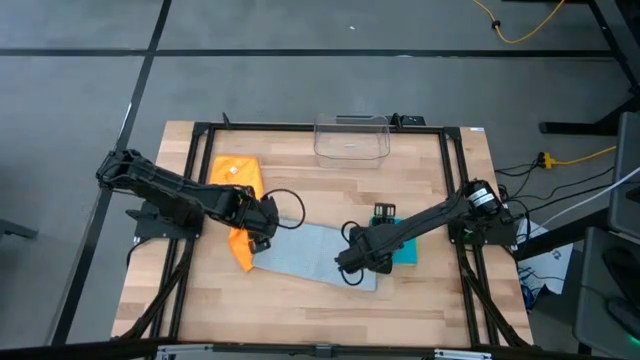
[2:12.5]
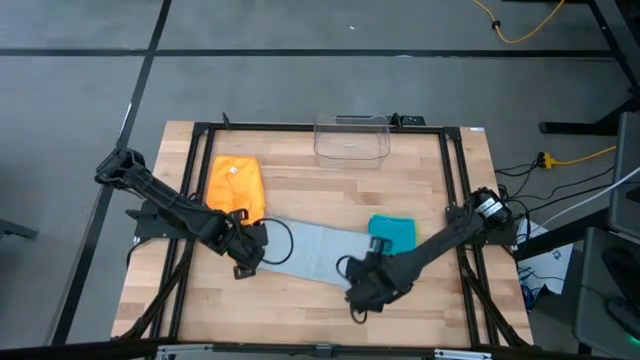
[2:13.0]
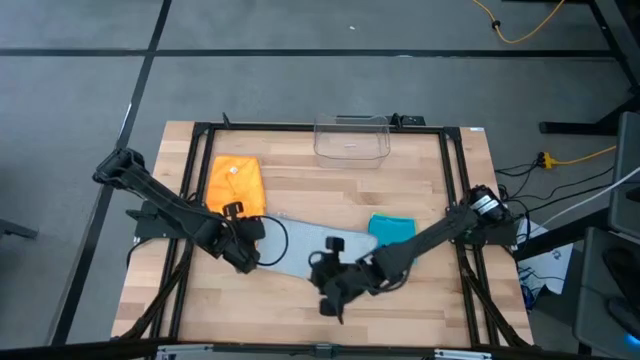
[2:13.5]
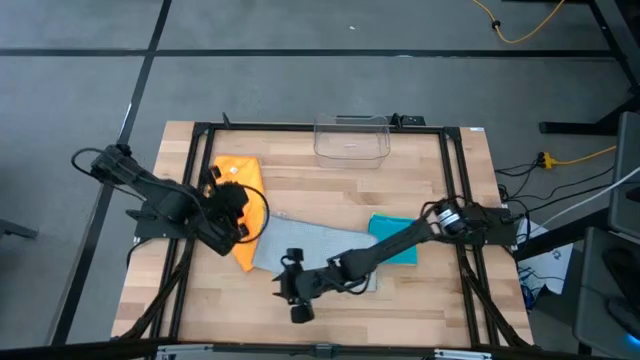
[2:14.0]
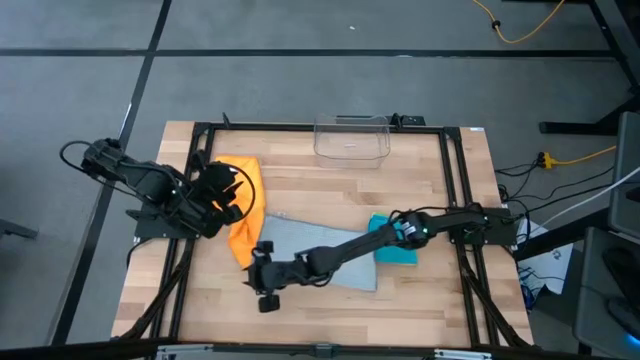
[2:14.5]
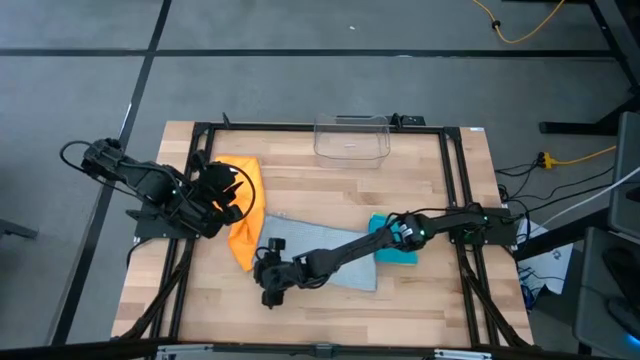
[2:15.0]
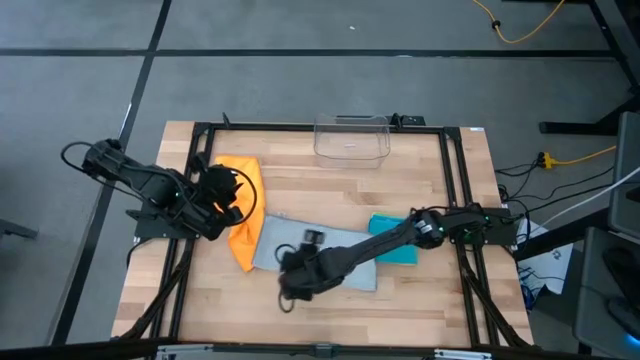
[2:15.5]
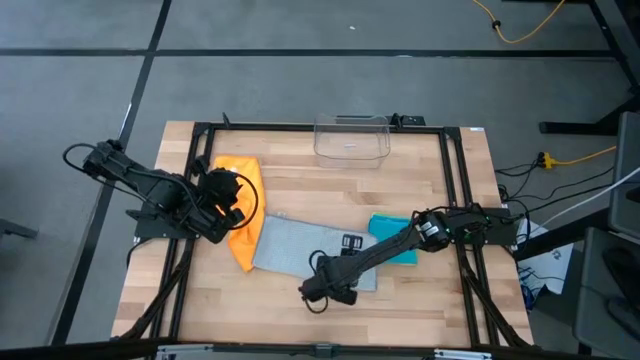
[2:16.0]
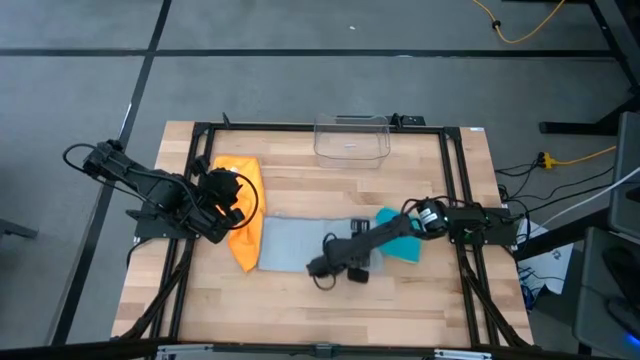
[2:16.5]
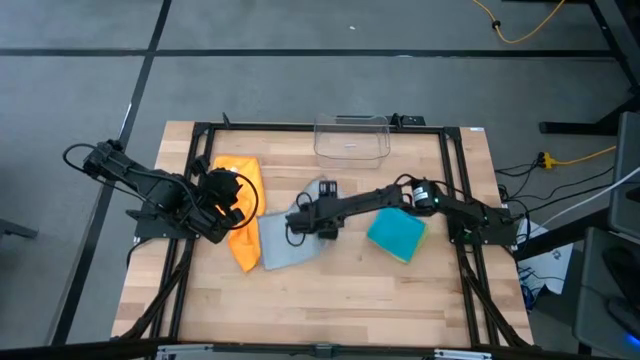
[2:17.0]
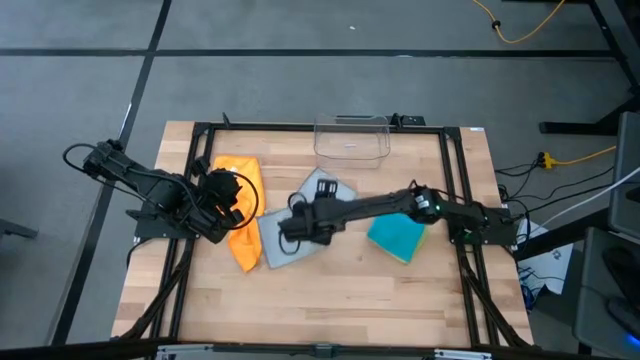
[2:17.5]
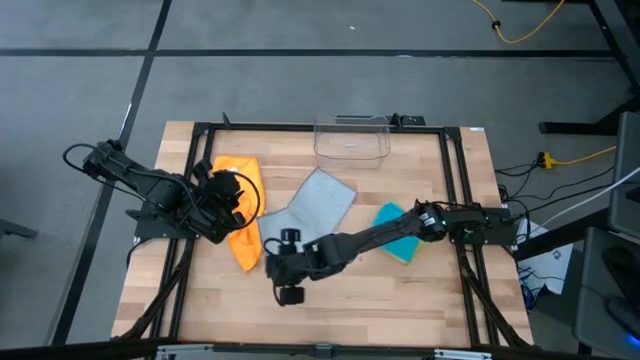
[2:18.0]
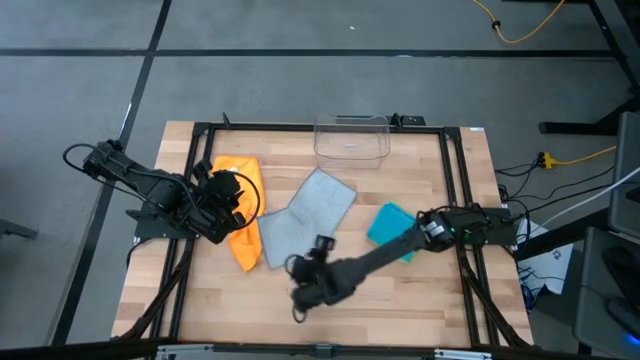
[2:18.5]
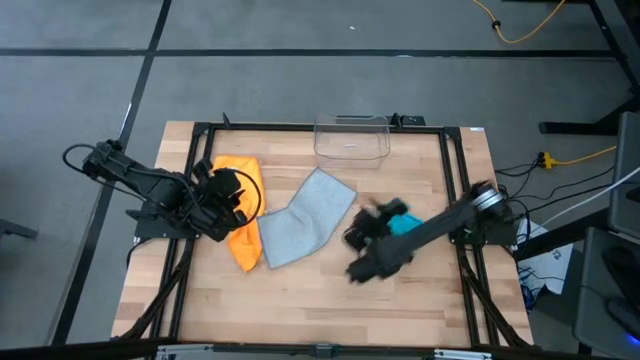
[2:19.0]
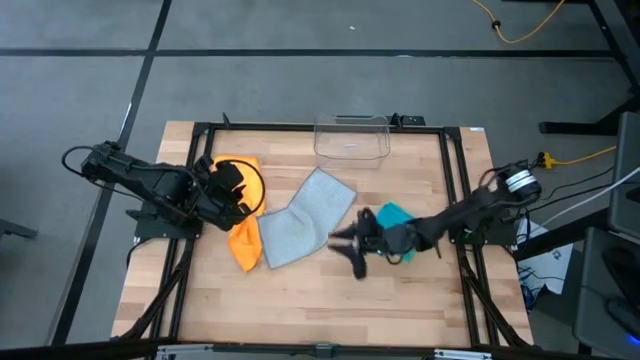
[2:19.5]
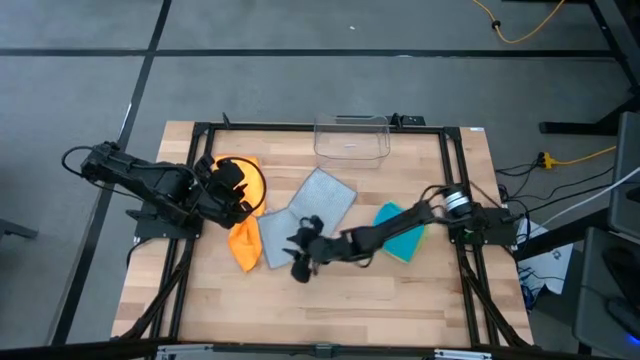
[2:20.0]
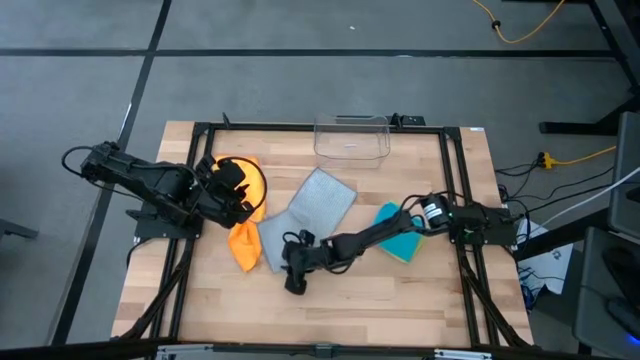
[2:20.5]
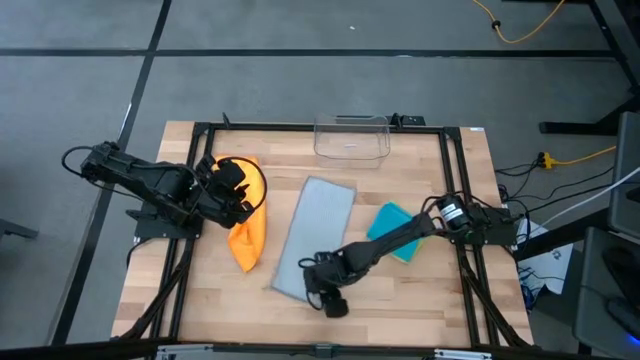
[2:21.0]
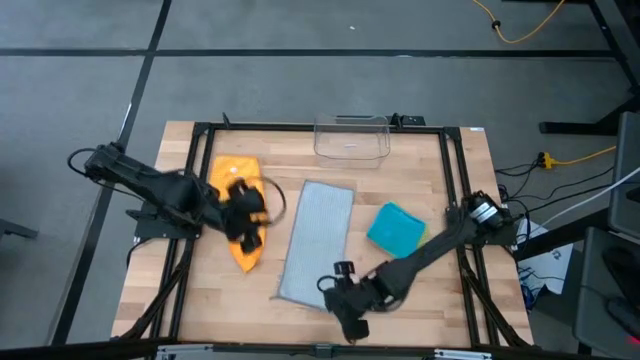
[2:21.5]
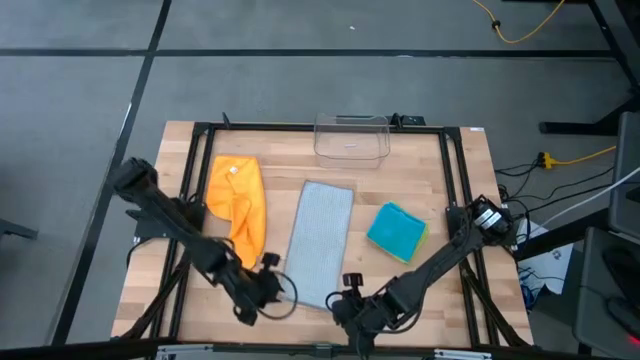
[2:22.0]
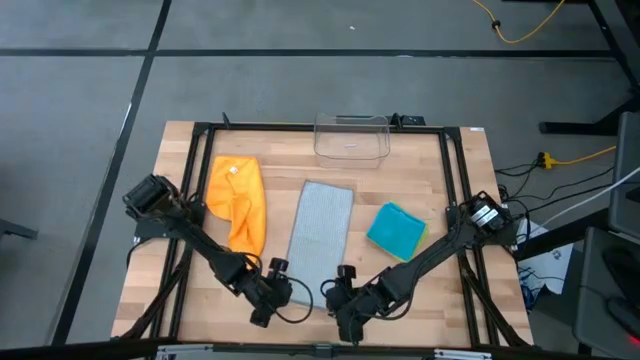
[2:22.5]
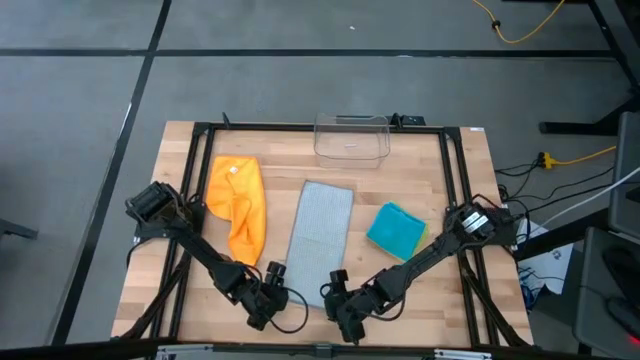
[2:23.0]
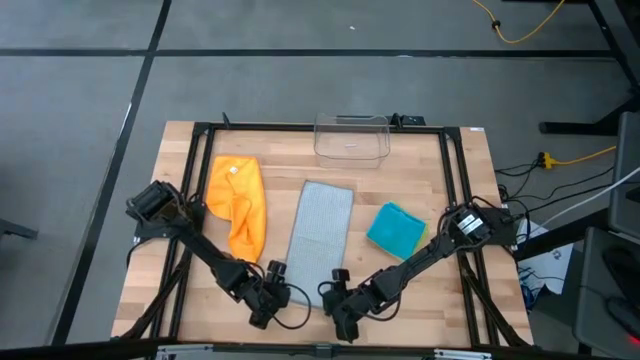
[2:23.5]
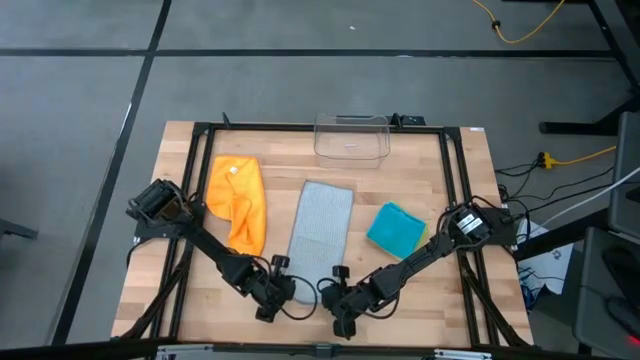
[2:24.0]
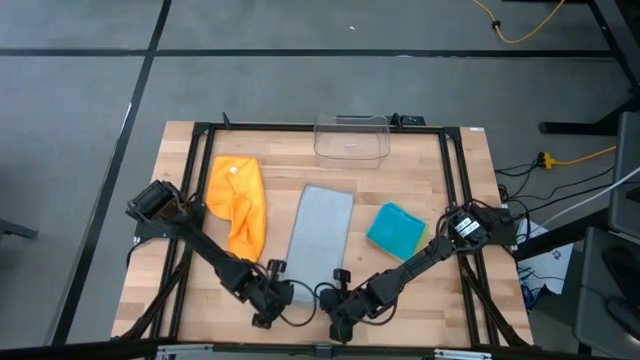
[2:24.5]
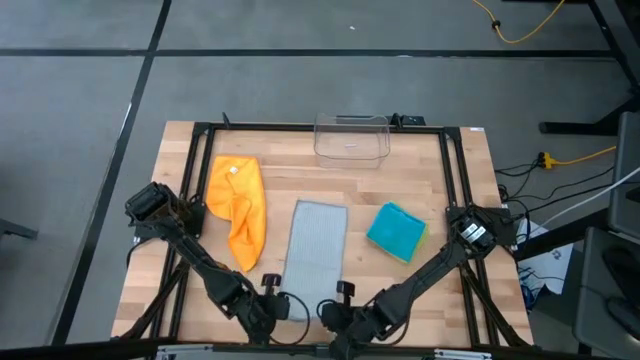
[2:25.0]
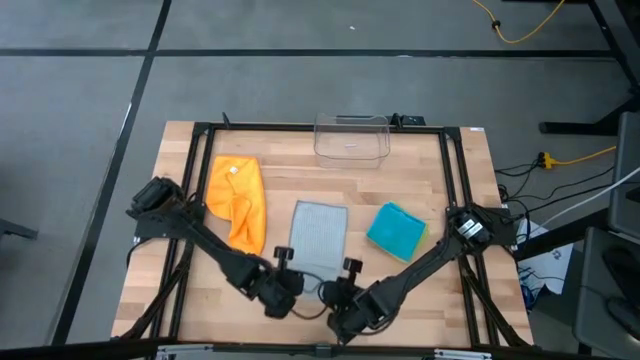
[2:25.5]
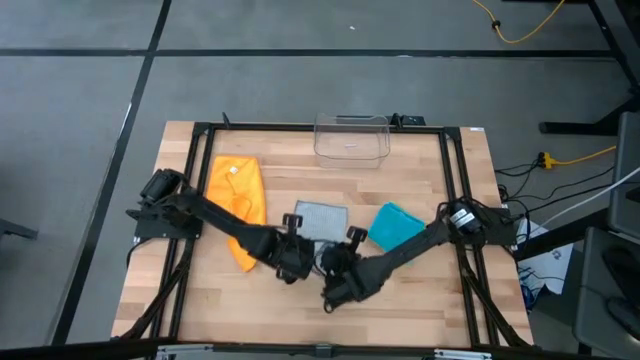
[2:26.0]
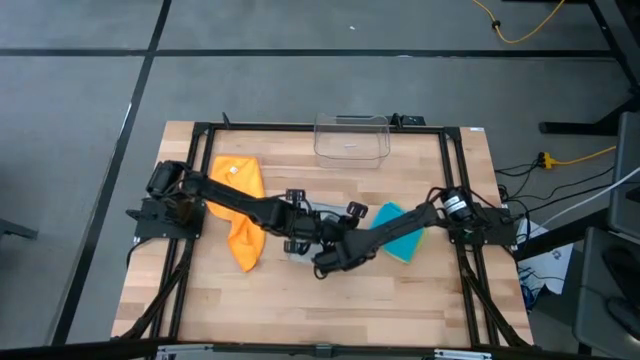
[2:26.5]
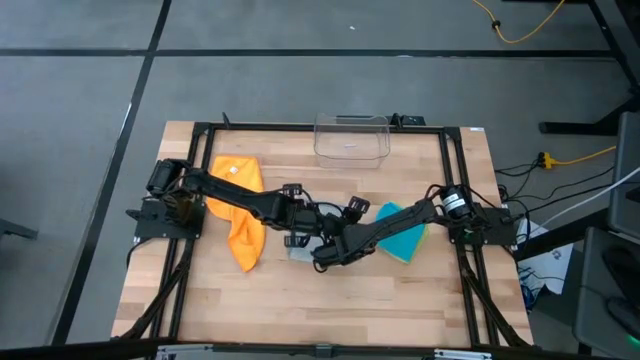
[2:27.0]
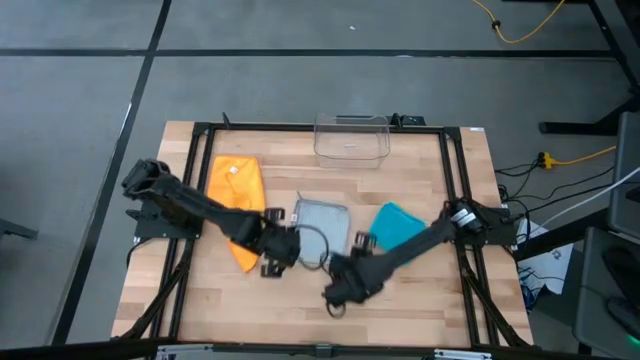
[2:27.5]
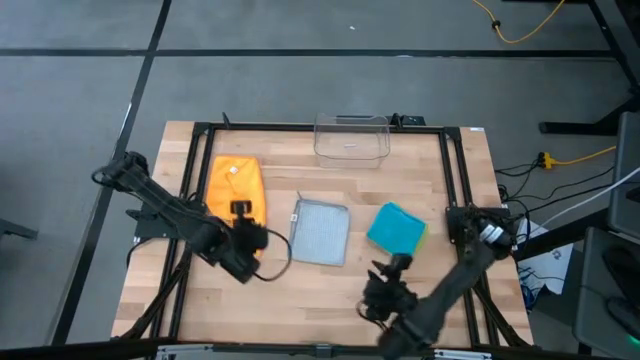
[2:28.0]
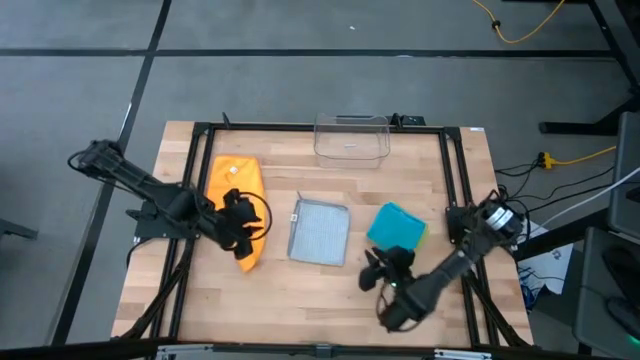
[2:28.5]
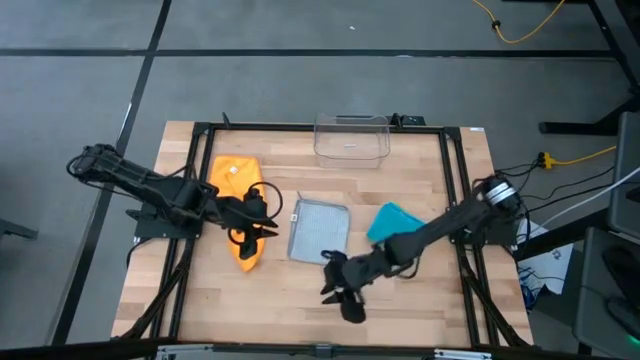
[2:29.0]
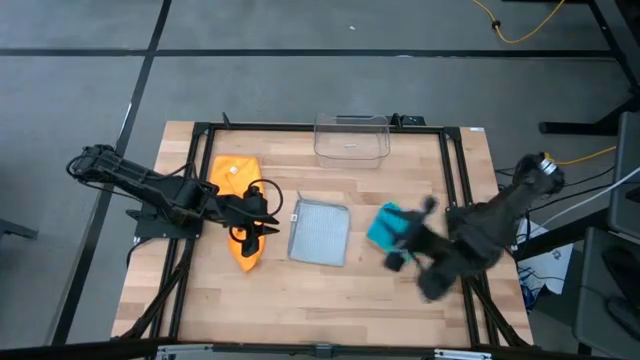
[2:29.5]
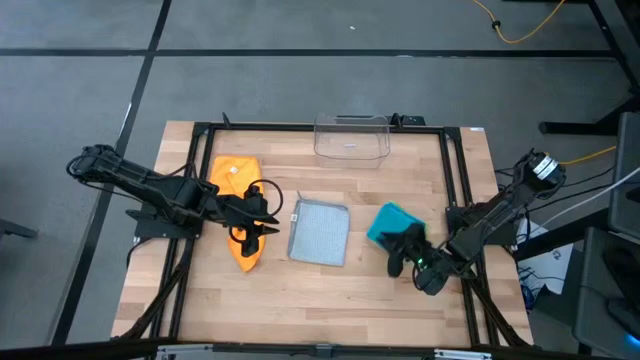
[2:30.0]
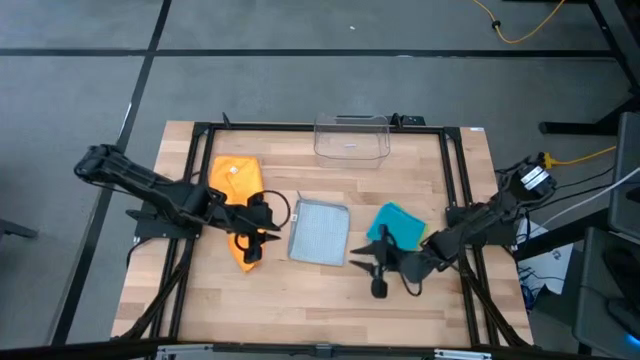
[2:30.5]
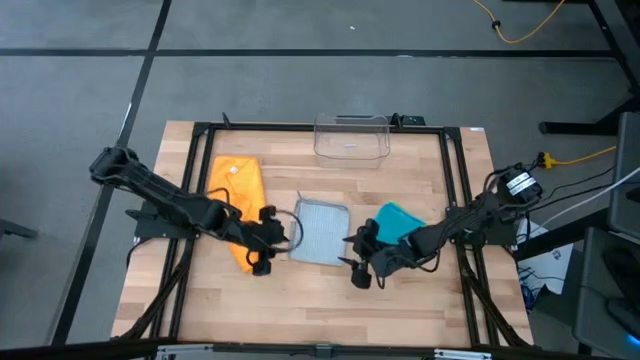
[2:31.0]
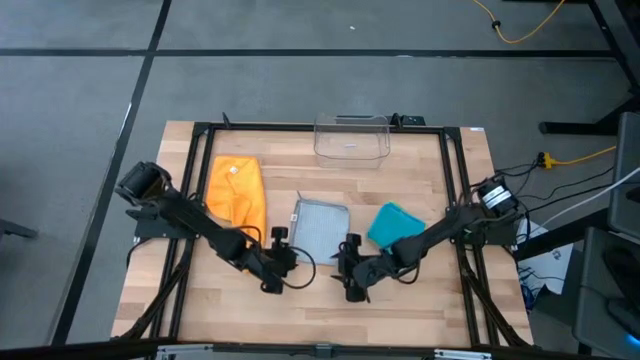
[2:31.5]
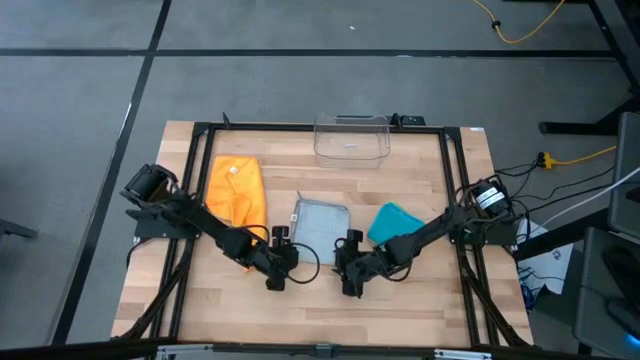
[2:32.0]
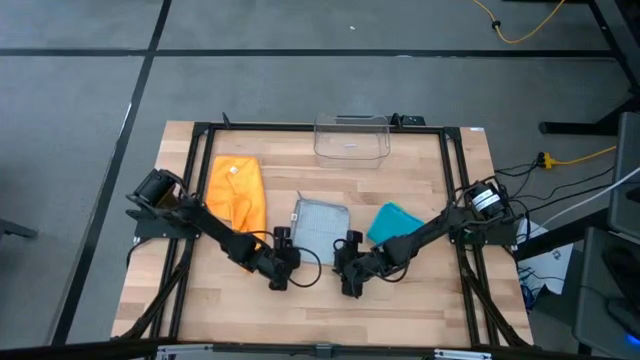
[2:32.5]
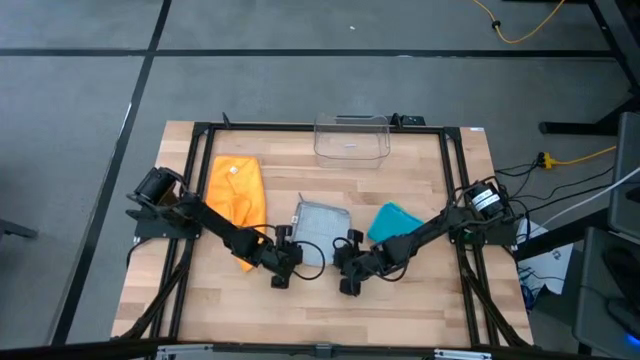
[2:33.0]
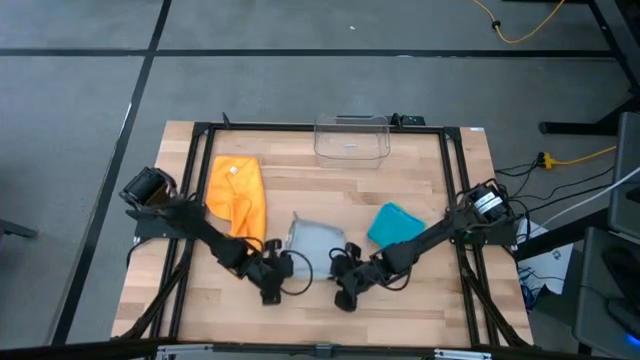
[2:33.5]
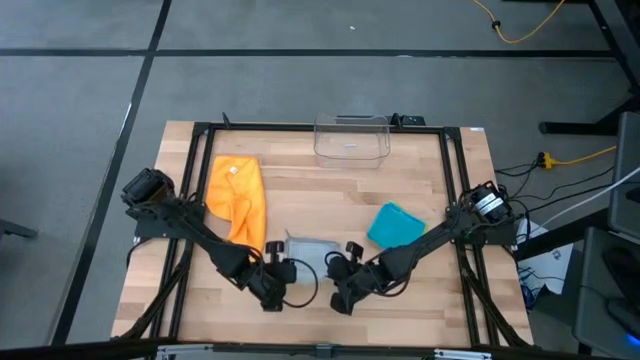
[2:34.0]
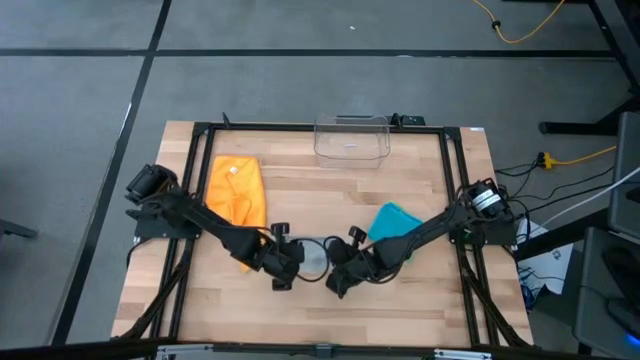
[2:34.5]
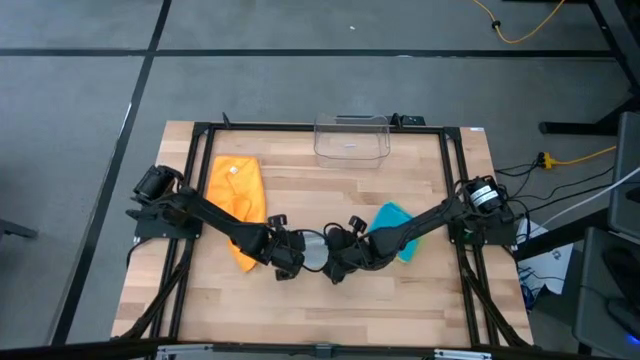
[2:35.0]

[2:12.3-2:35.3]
Task: Fold microfiber towels
Fold the gray microfiber towel
